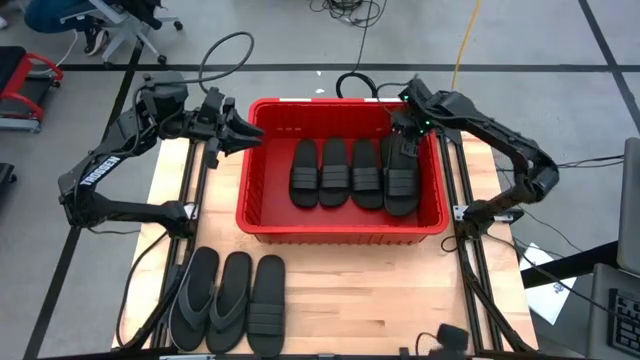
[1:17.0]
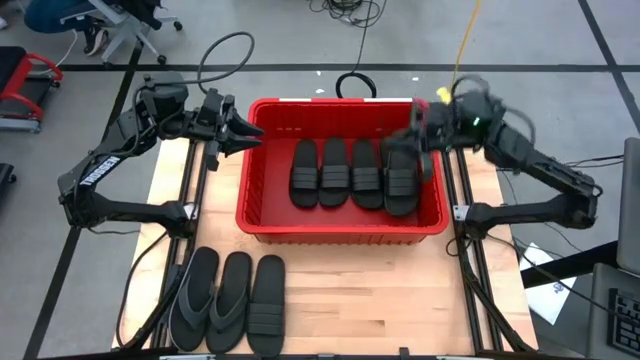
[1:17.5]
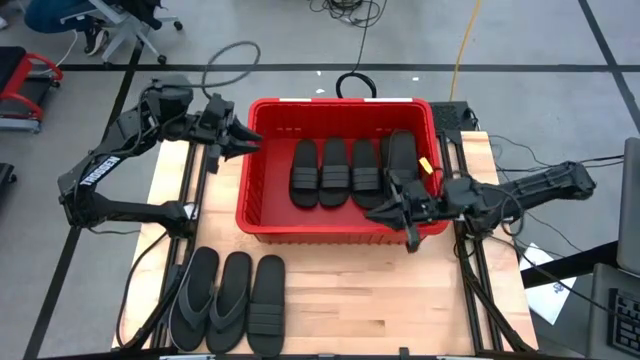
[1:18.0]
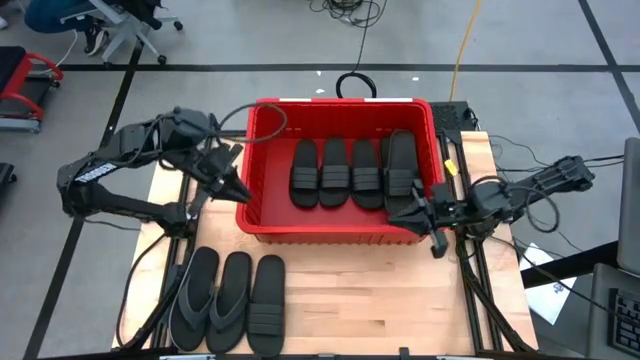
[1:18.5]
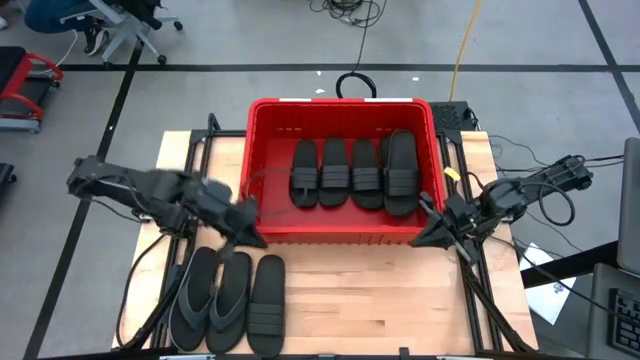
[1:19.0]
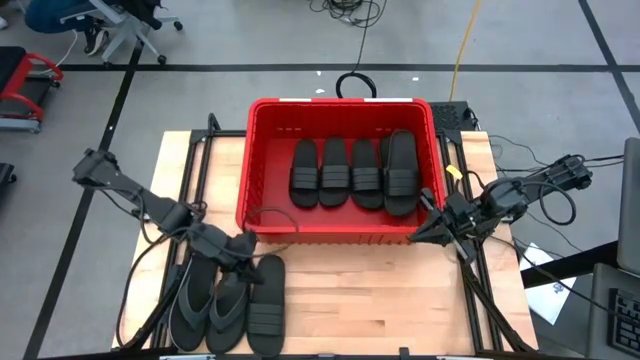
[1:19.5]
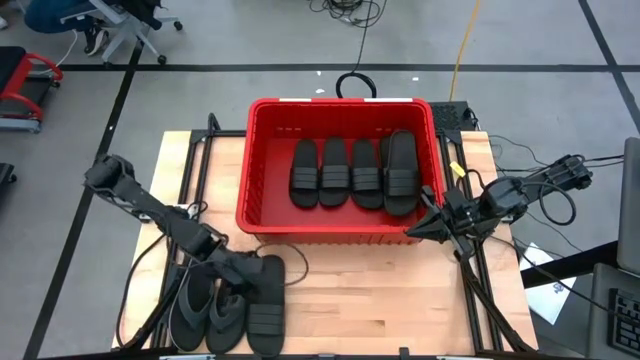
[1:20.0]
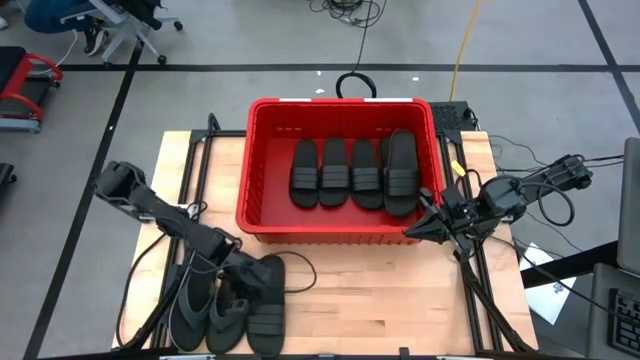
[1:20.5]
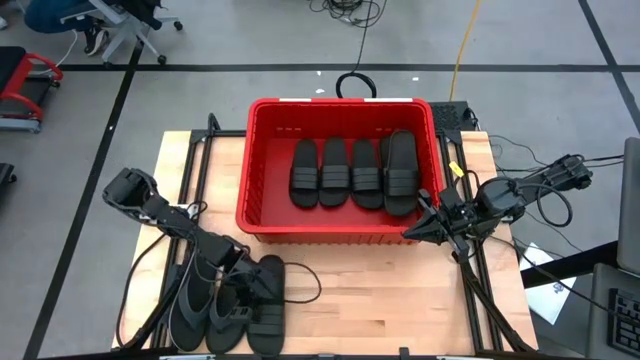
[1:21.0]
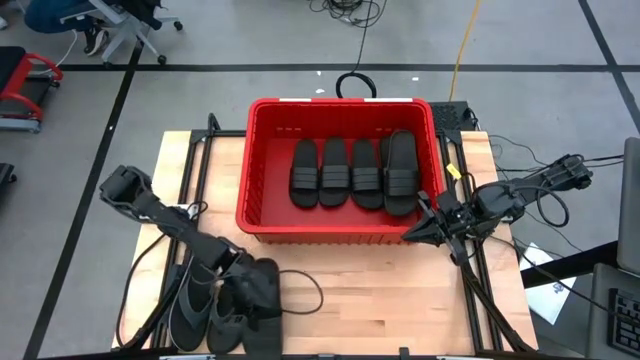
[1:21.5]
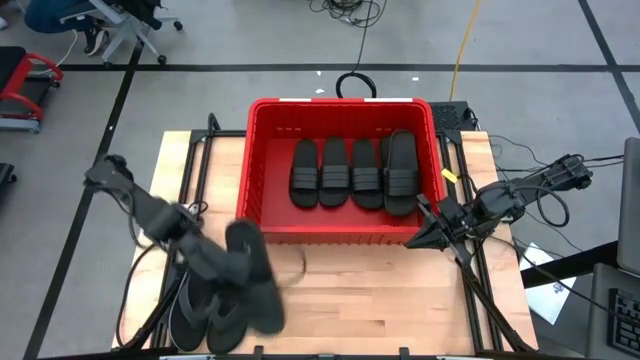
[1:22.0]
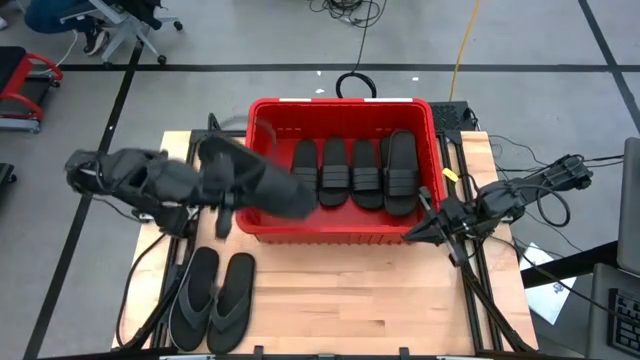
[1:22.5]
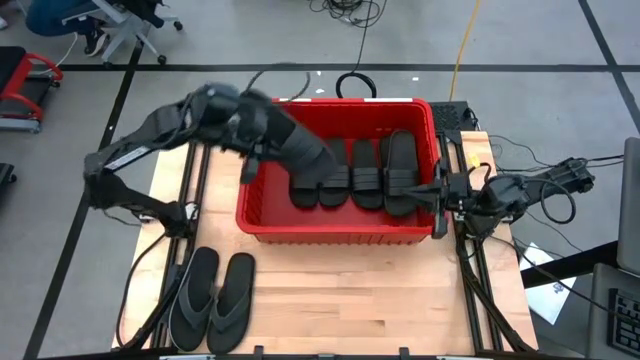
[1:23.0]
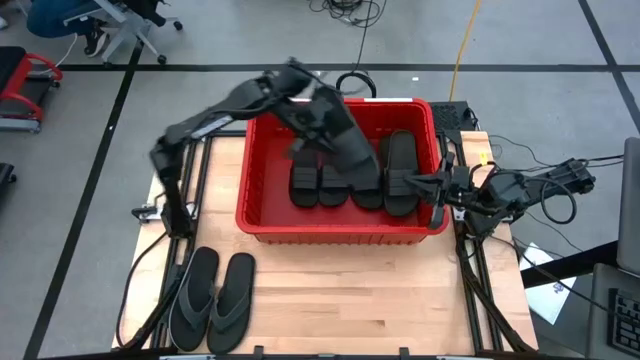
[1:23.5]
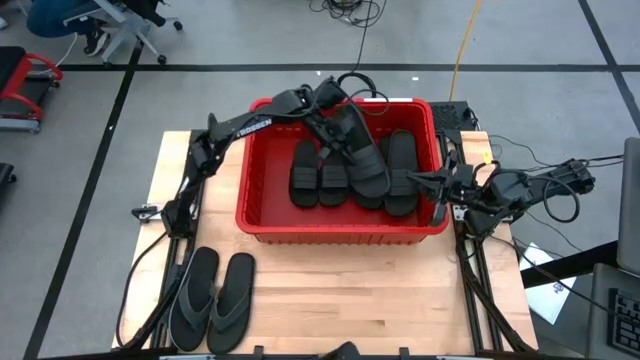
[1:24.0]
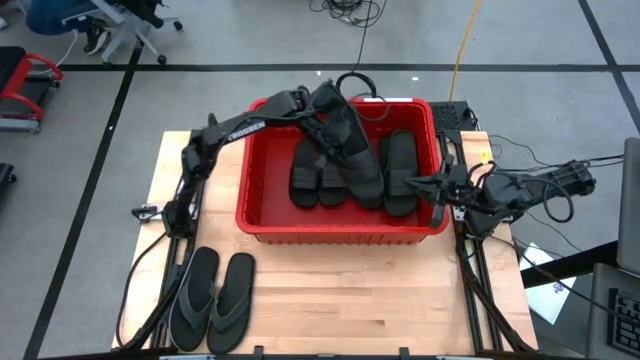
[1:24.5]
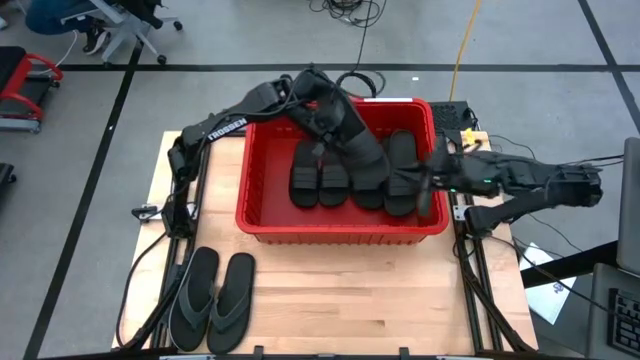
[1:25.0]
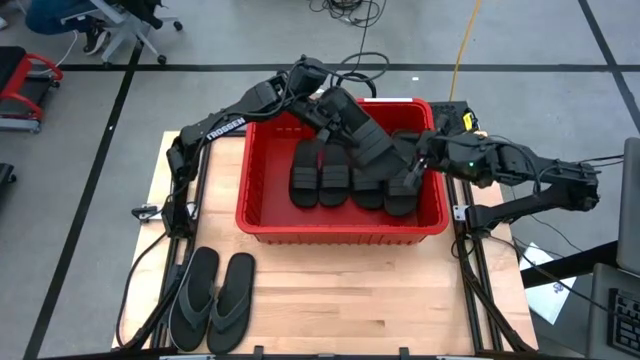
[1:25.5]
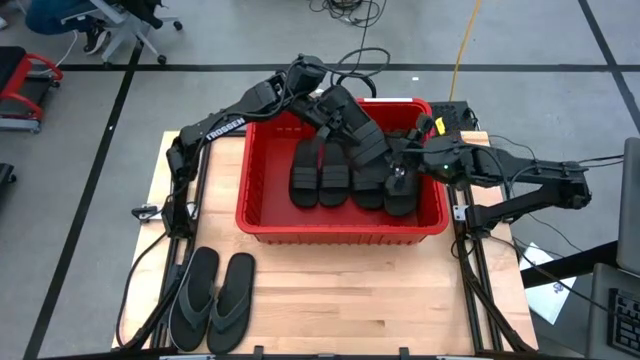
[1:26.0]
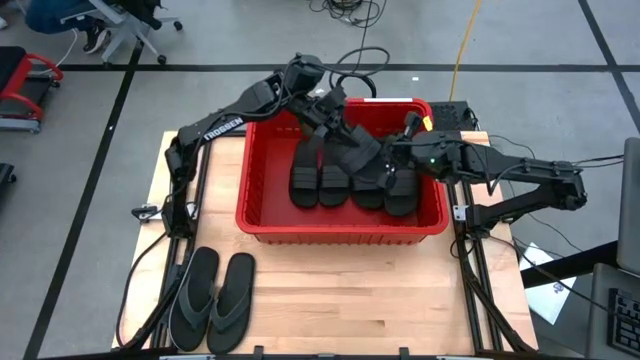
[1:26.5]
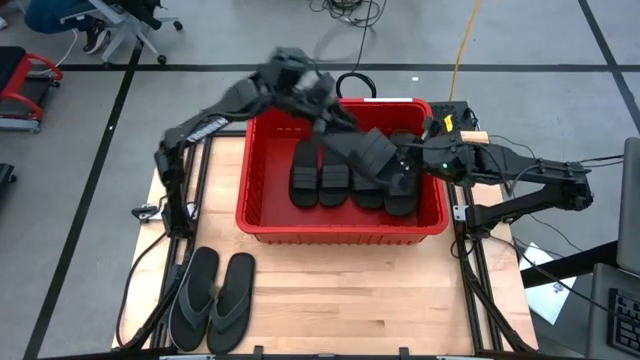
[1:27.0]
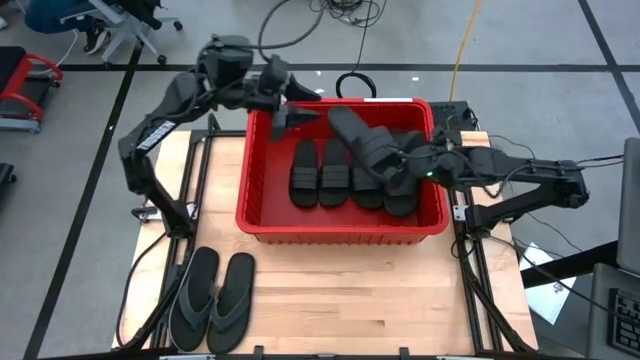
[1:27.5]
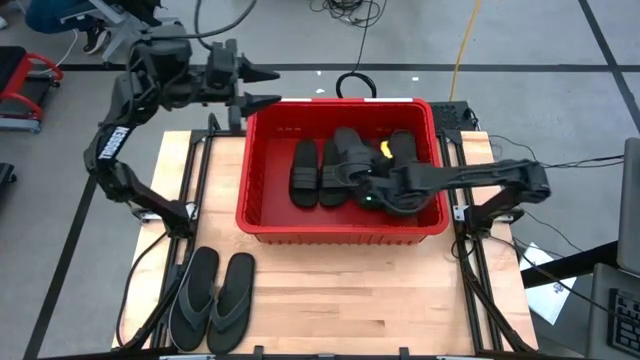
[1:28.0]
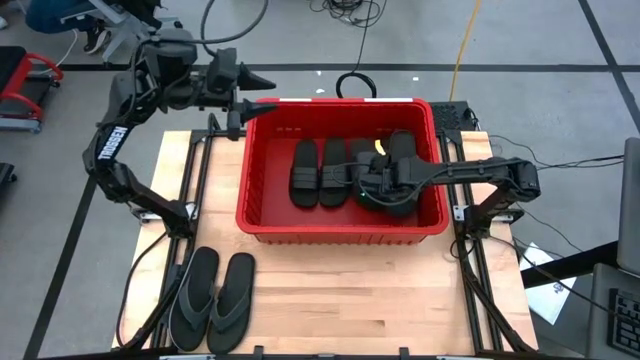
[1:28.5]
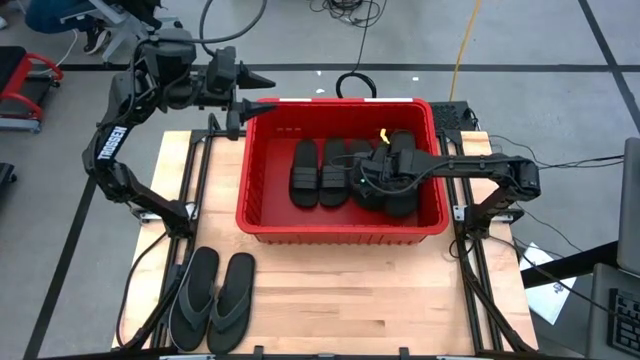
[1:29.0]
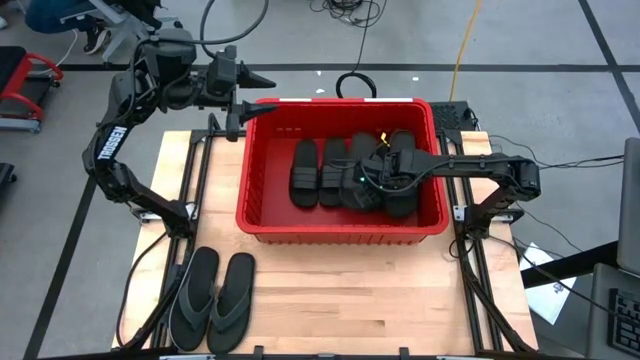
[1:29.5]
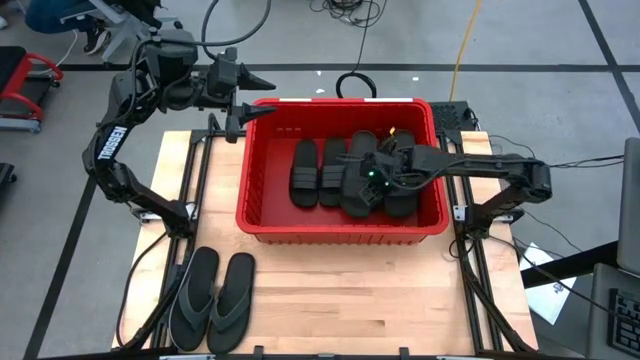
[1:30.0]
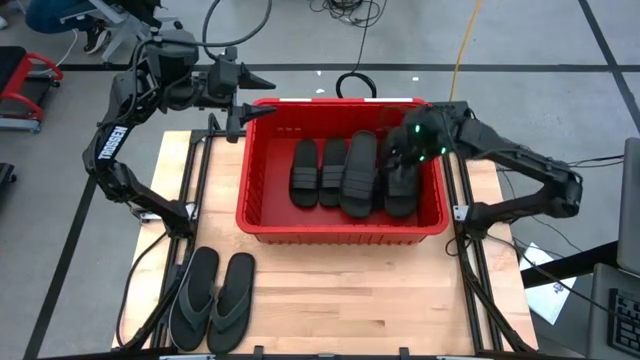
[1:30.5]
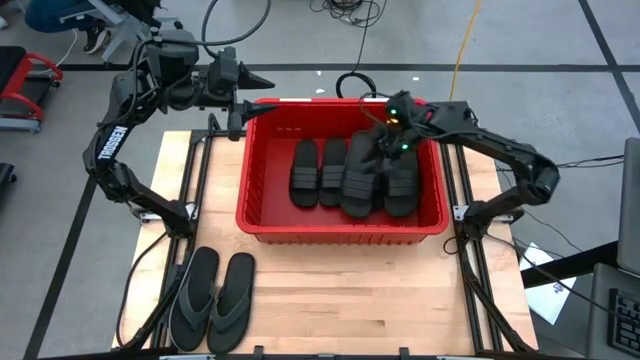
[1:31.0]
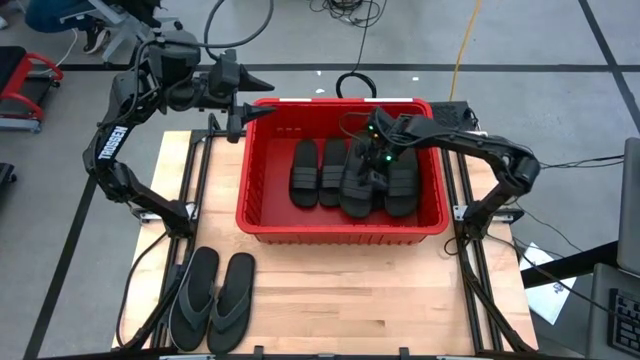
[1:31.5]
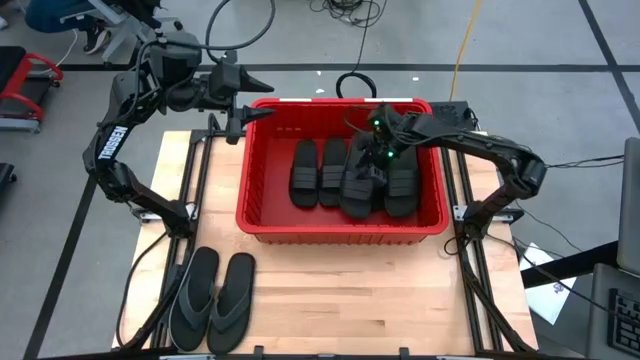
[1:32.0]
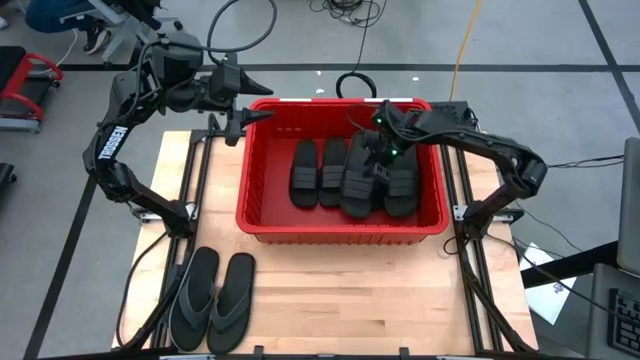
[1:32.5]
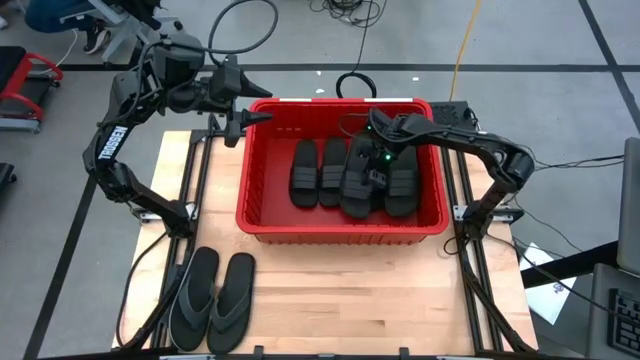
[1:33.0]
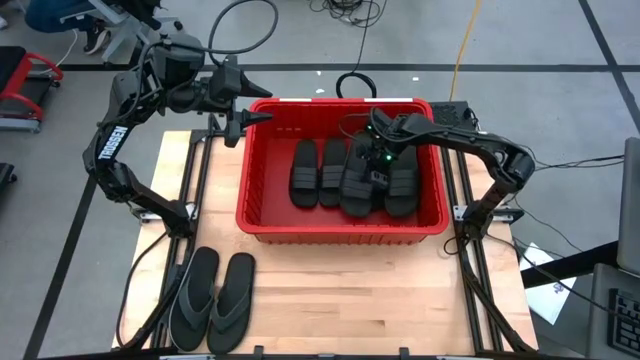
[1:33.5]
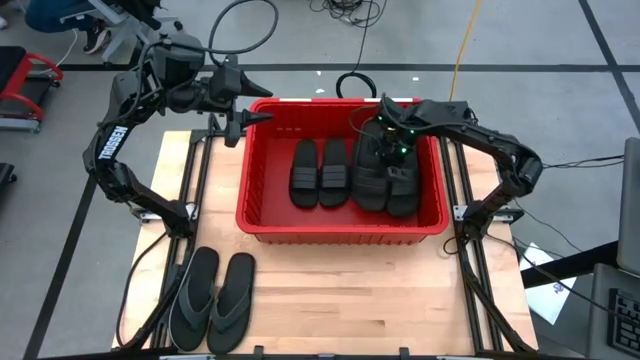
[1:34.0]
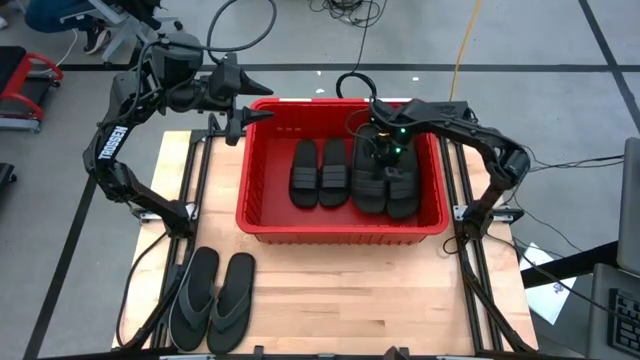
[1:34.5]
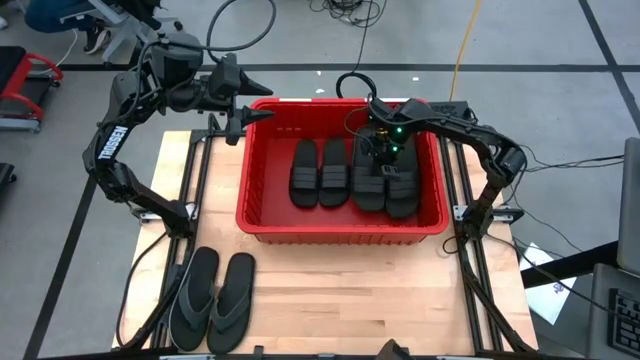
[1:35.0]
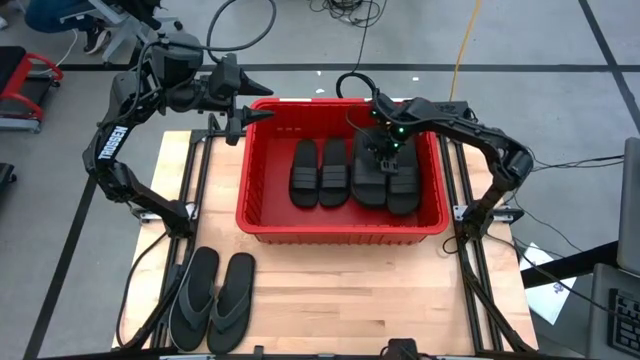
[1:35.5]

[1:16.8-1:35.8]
Task: Pick and place slides into bin
Put the black slipper into the red bin

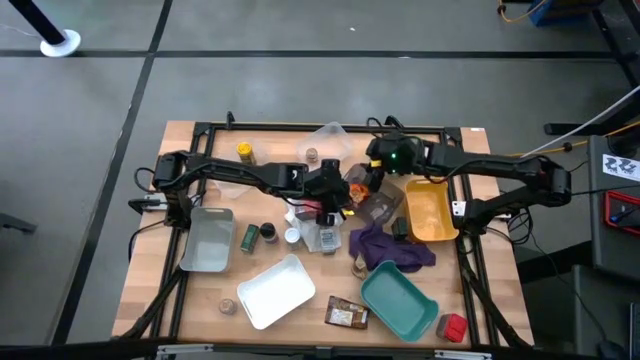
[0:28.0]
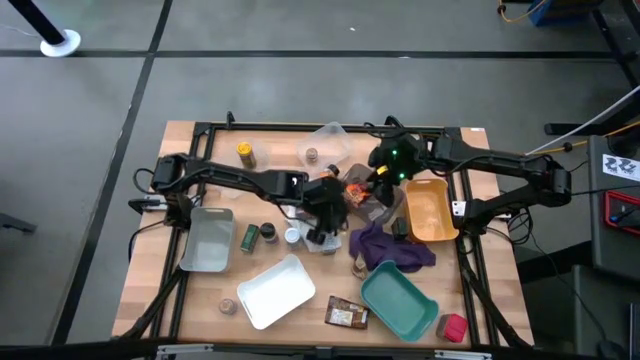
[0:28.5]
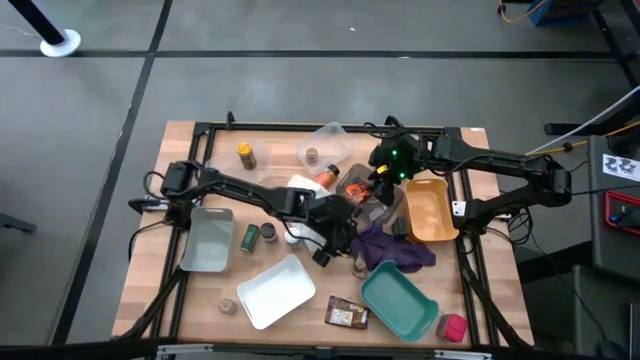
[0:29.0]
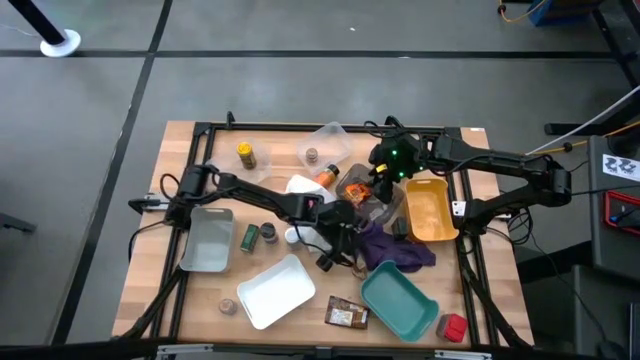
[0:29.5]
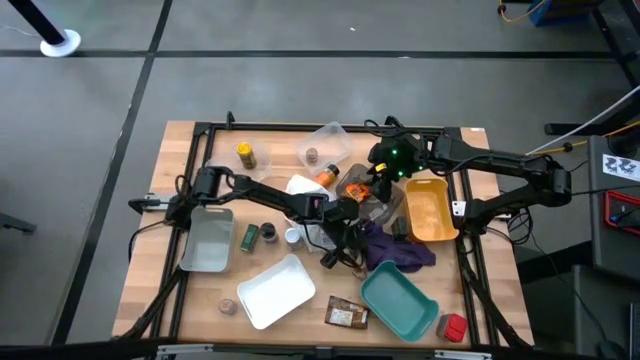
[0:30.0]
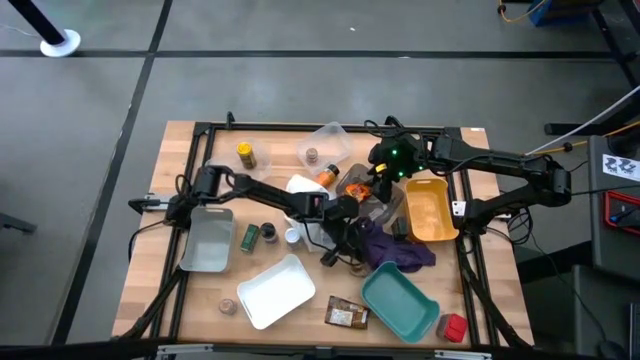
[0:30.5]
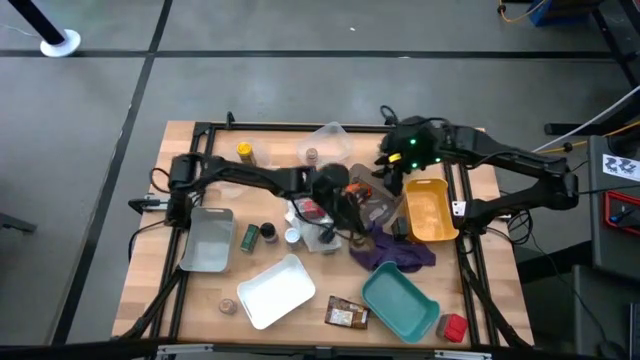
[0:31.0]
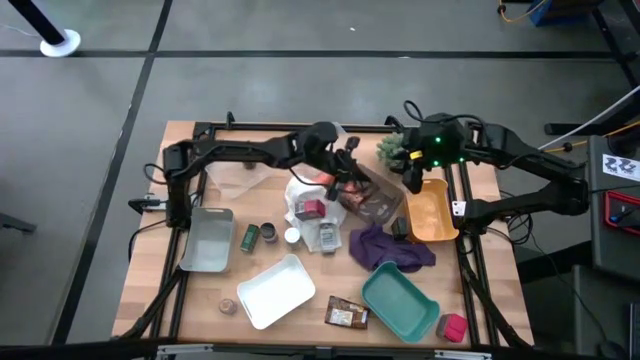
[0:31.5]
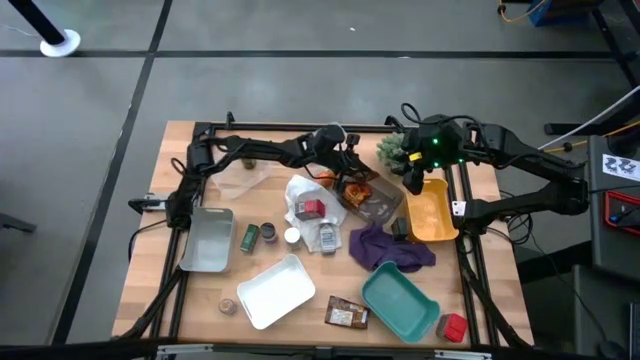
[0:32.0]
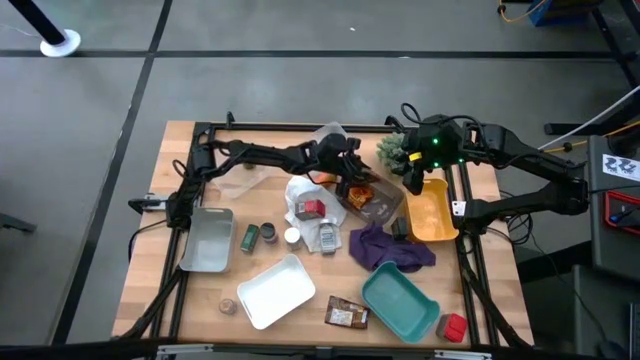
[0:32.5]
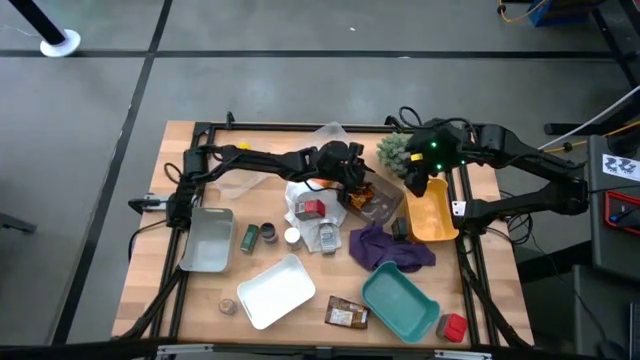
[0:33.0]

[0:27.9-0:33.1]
Task: Sort spices by type
Put the top orange spice pack into the black bin
